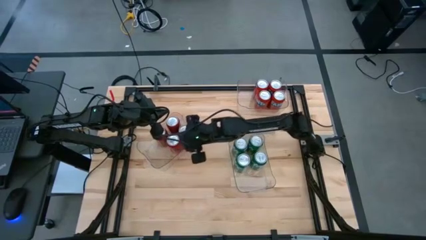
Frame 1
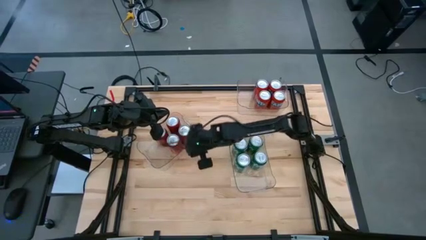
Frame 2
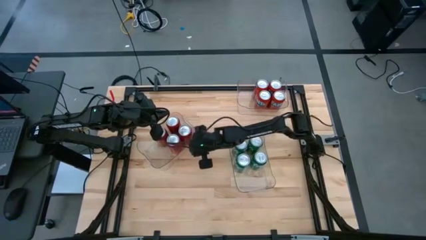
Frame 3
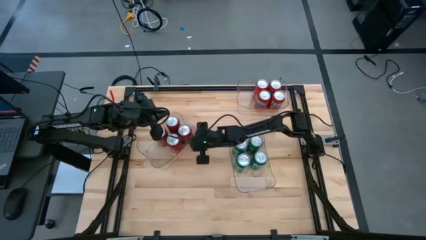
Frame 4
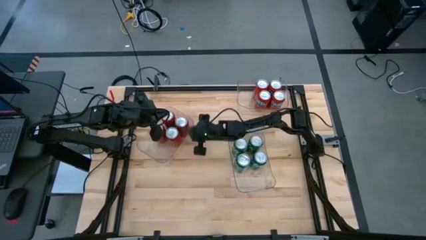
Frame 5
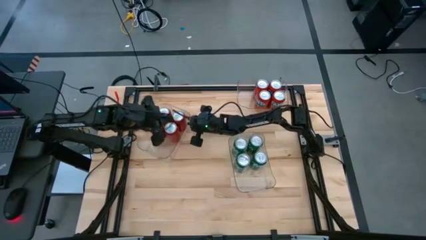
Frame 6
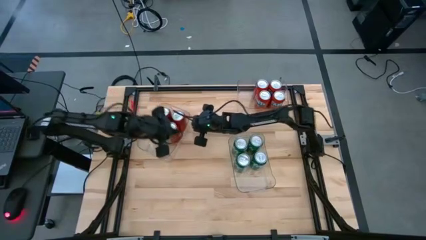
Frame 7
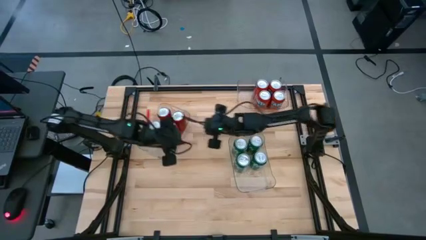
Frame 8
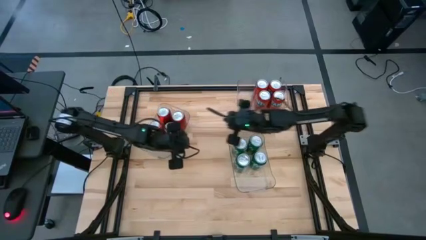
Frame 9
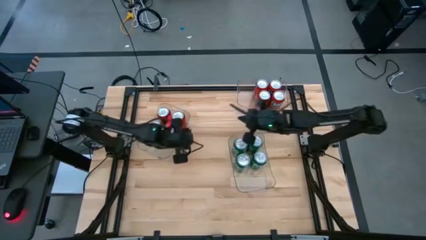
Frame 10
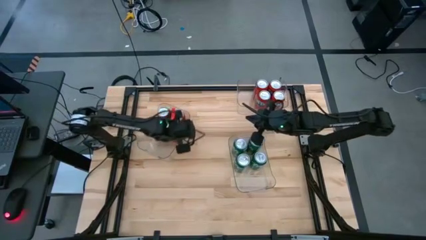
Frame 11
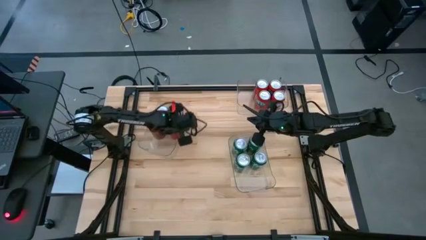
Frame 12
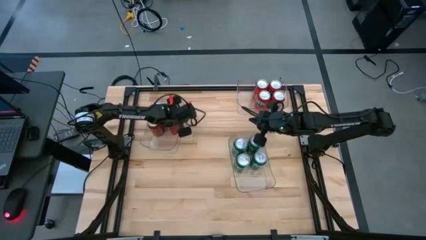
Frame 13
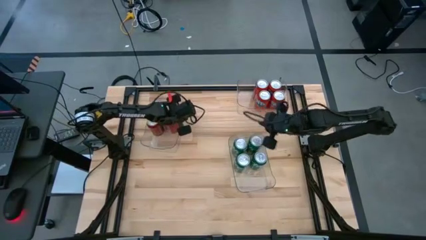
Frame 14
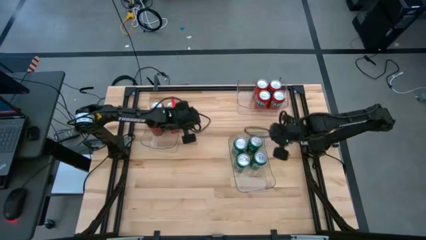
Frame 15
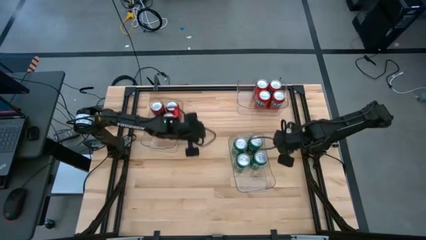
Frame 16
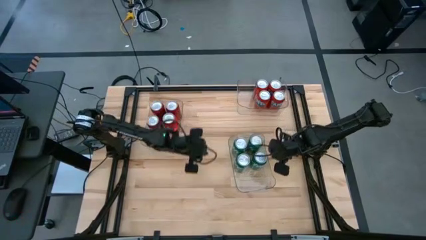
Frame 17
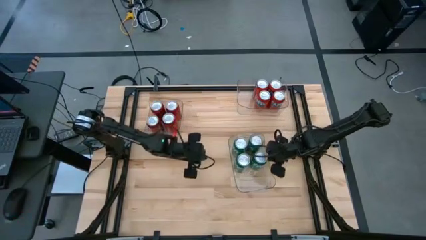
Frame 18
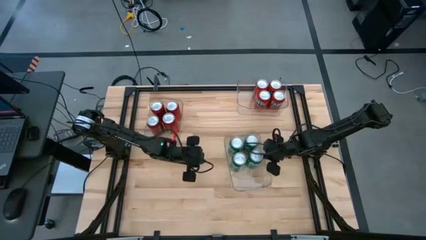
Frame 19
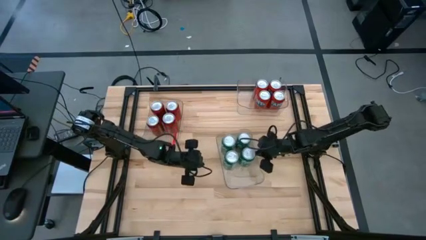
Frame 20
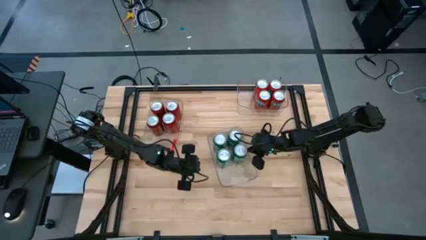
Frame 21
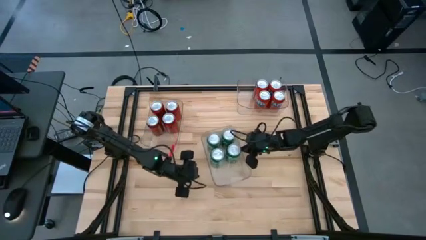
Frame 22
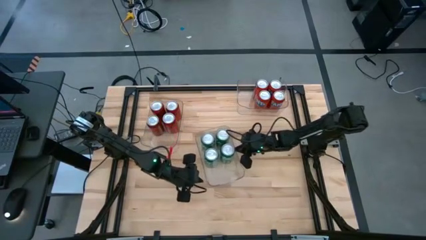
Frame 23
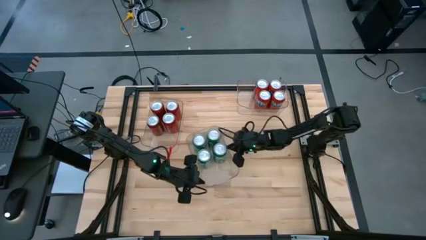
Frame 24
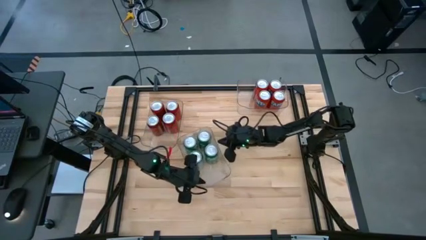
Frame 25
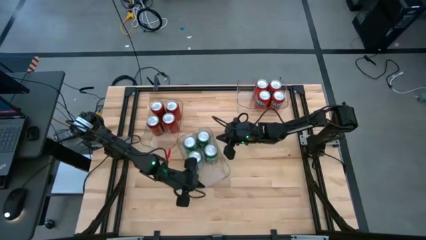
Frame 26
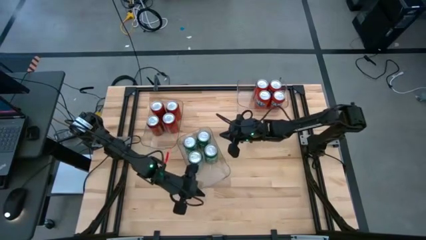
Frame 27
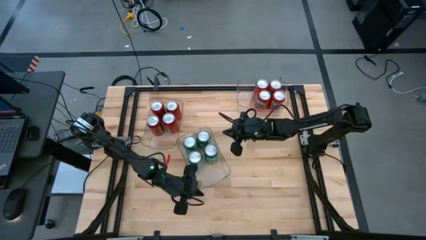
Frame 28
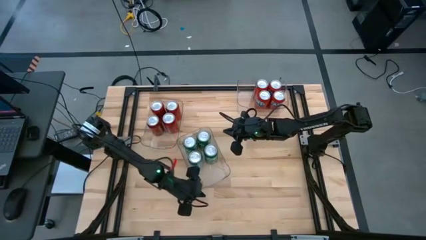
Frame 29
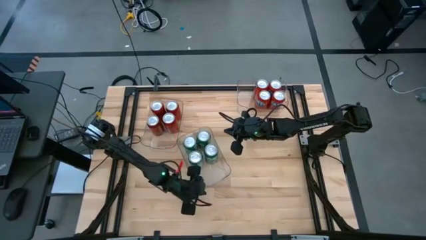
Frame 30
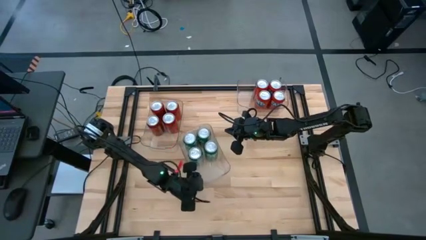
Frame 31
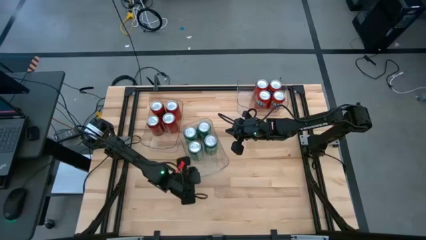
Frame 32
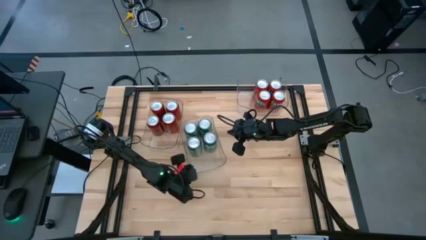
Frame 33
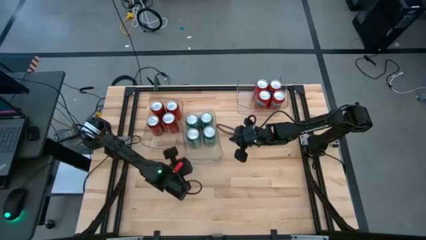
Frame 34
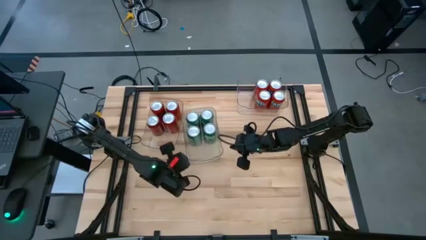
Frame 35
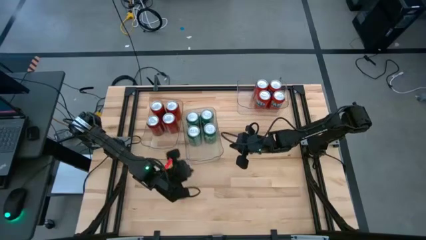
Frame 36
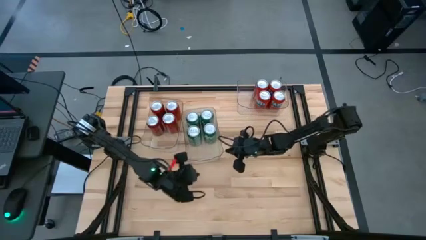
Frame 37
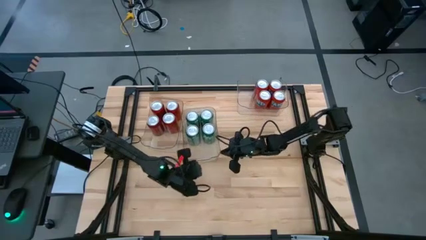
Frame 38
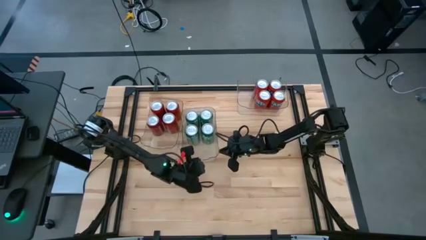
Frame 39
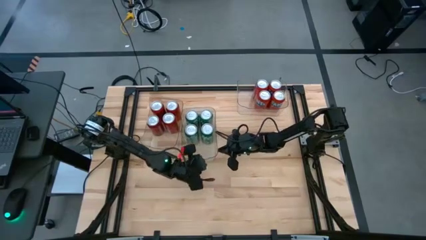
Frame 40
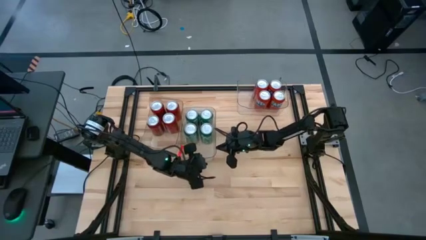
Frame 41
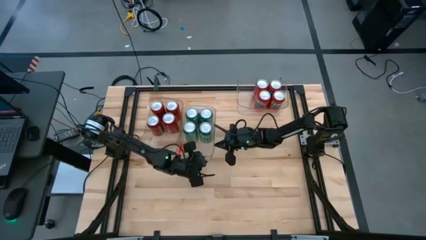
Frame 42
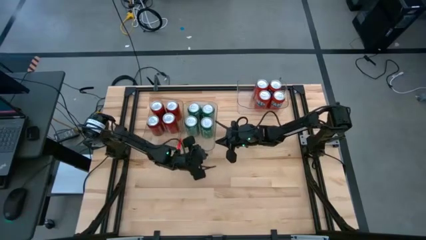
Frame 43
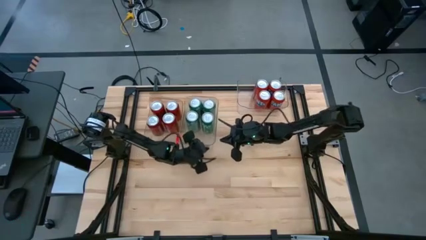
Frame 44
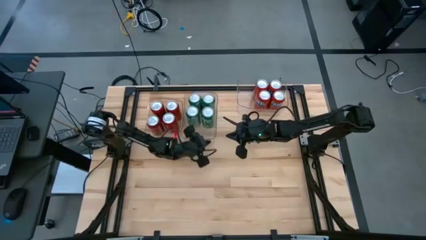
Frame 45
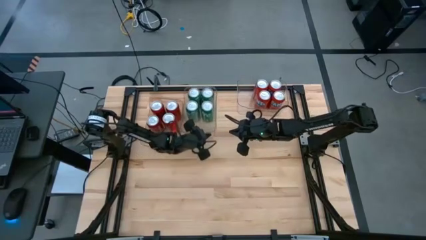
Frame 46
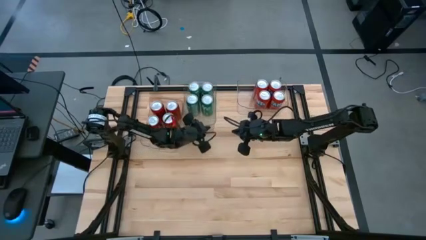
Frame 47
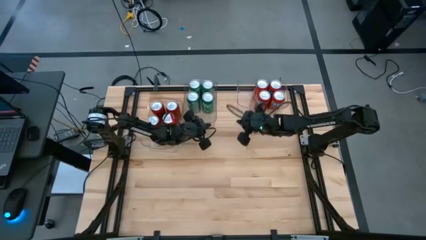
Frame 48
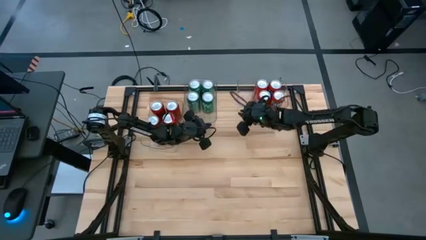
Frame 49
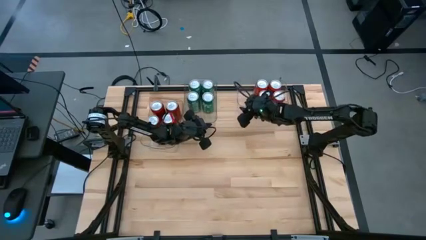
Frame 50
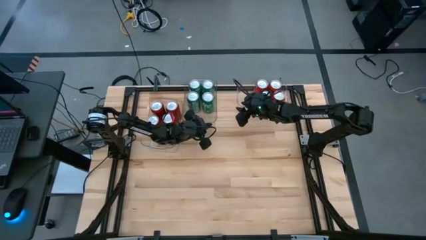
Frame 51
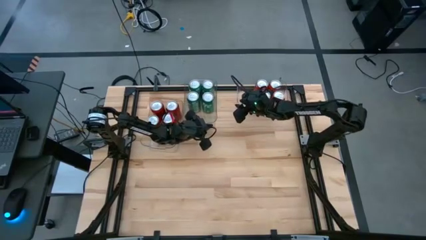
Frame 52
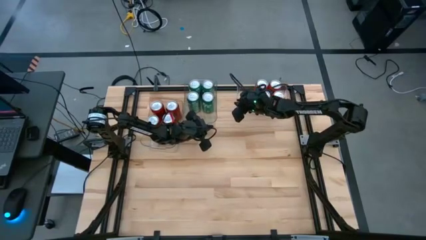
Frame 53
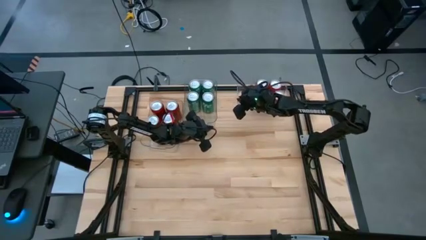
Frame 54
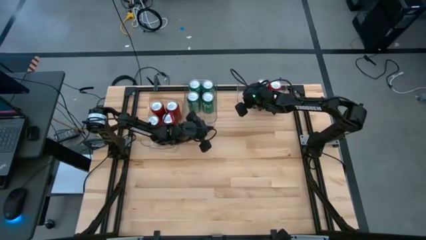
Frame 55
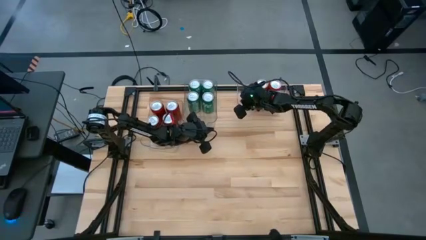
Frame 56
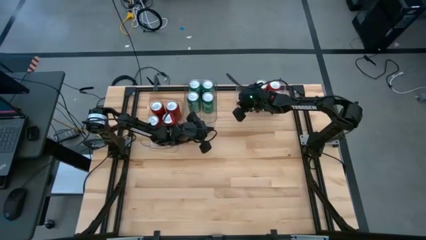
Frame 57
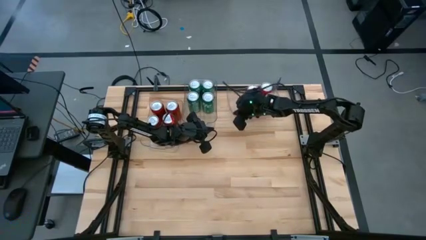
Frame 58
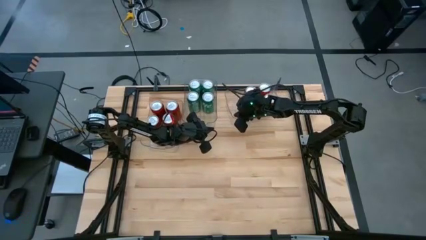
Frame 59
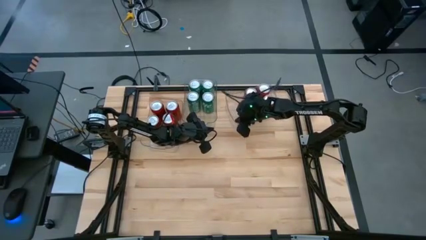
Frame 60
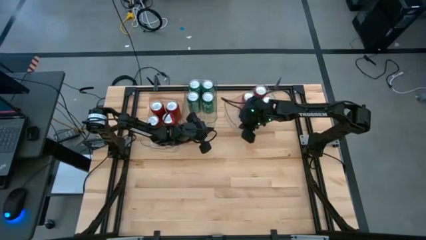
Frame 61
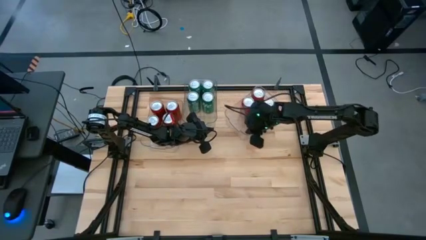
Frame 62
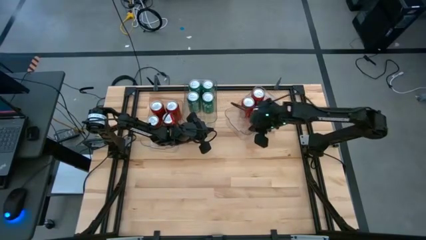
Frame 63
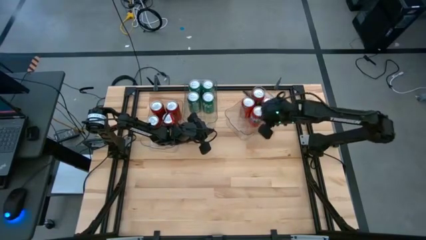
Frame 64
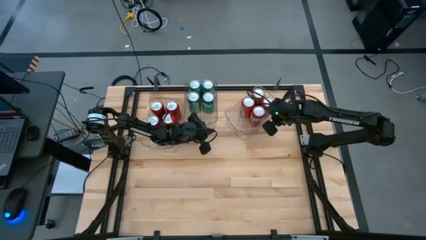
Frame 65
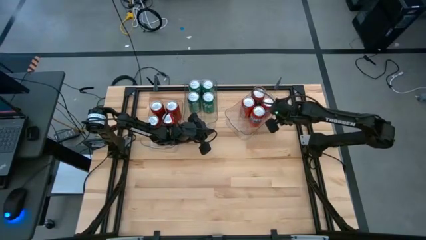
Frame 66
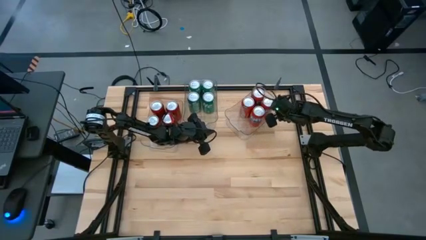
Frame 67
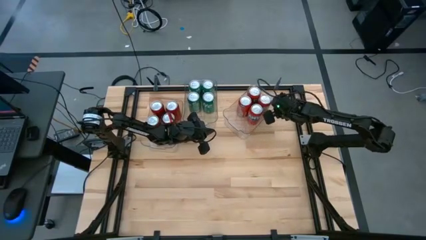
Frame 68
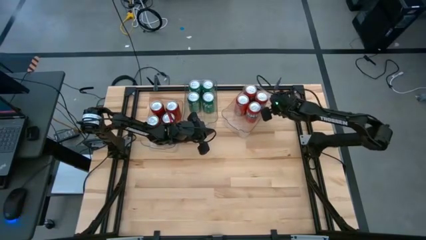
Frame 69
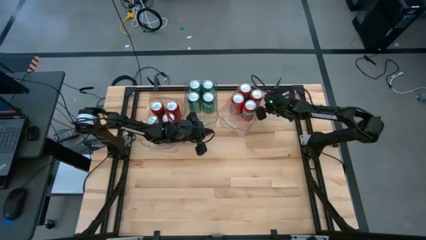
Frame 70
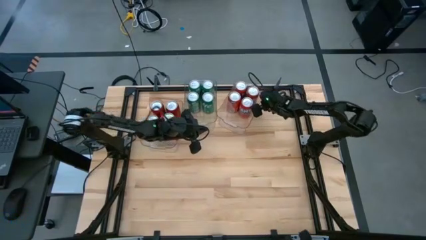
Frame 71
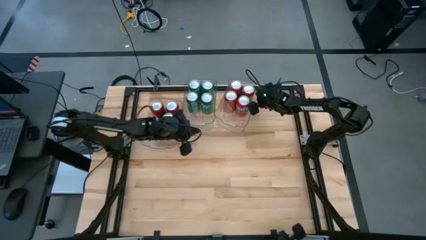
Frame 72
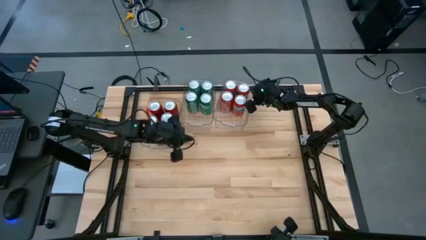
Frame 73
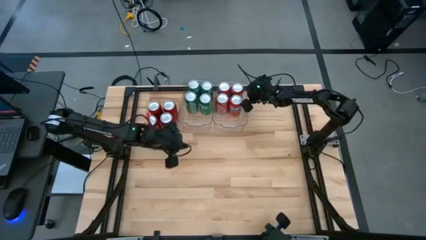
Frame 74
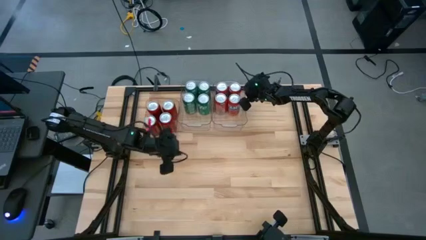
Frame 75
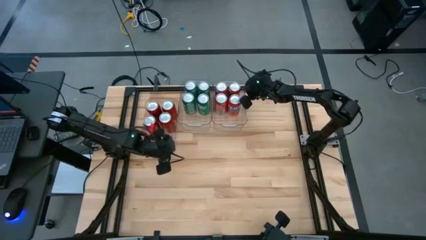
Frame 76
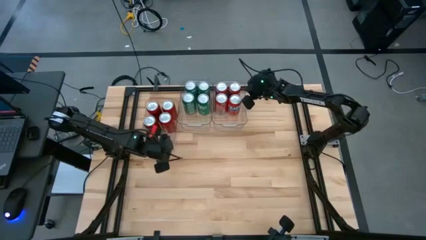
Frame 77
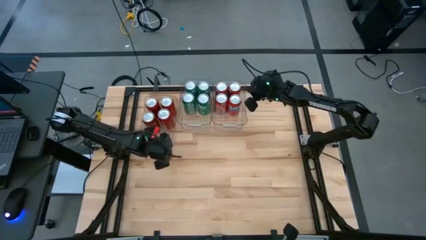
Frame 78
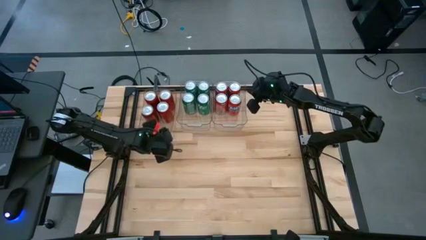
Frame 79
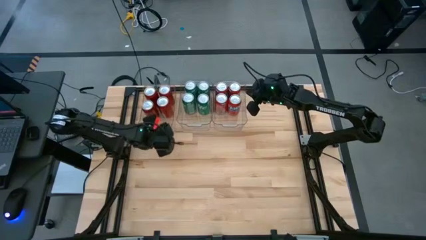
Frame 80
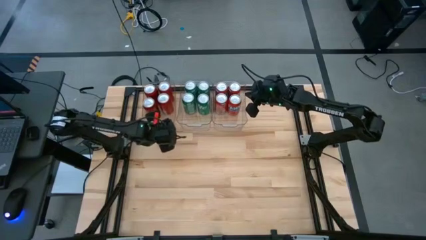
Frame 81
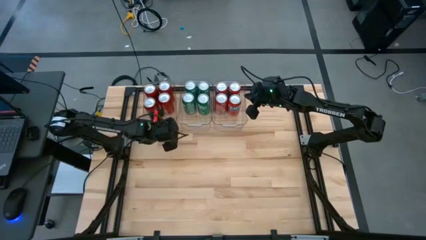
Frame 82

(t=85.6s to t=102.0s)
Task: Sort soda cans
Move the transparent bins on the top center

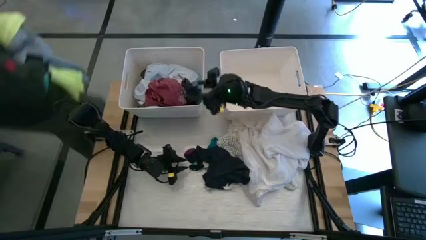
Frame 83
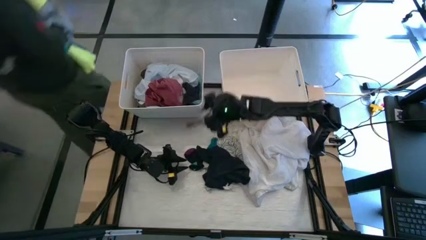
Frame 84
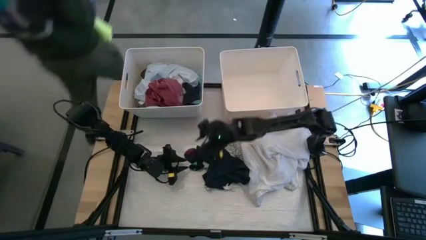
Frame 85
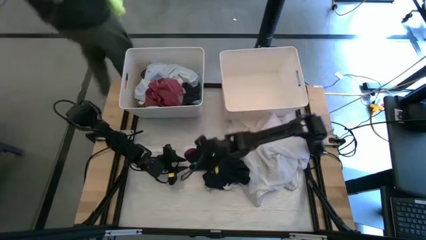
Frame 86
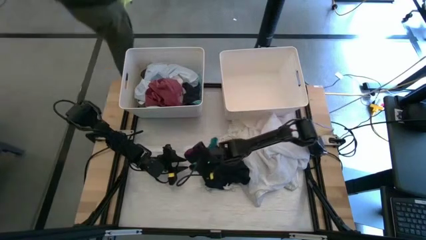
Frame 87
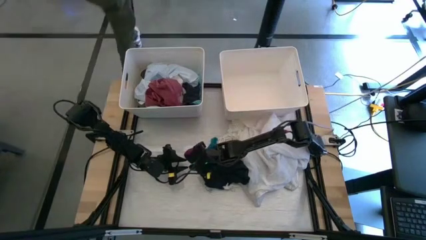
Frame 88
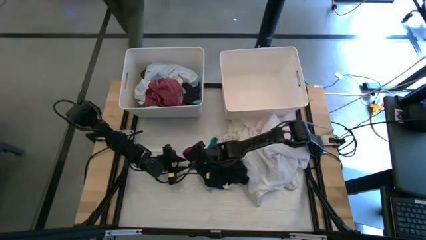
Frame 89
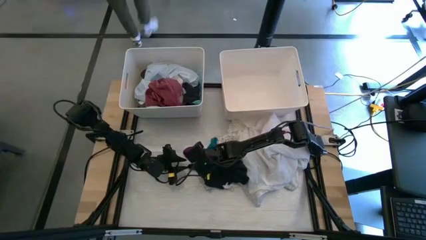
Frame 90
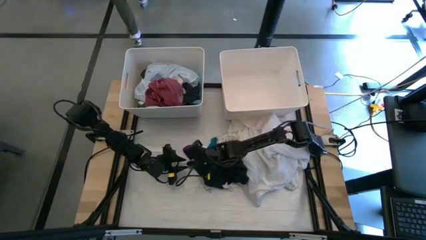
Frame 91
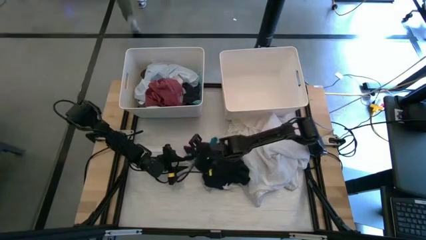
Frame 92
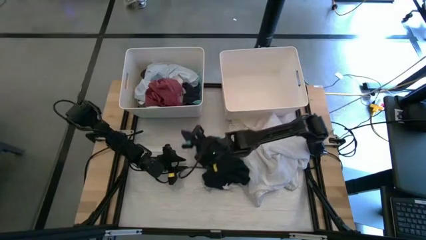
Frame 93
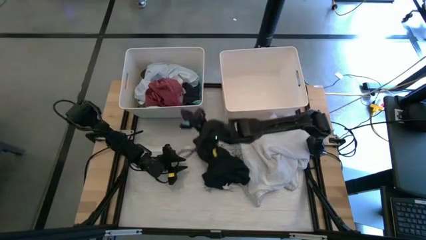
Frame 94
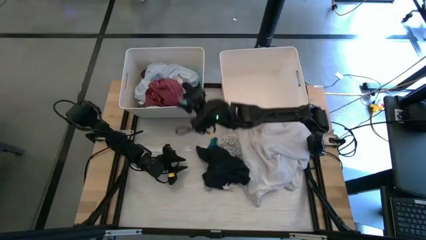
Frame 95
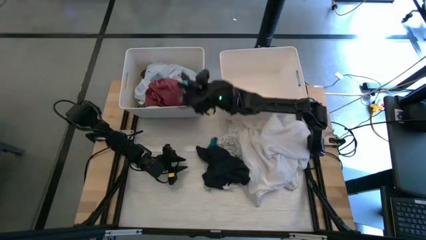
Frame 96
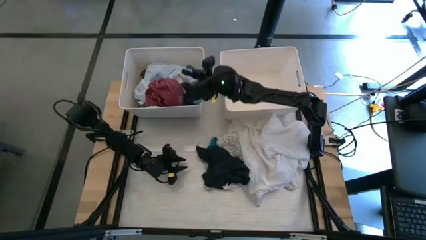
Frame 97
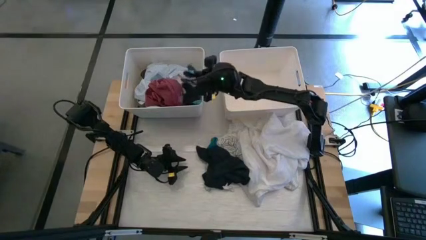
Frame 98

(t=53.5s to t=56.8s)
Task: Sort clothes
Put the black sock into the left white laundry bin
